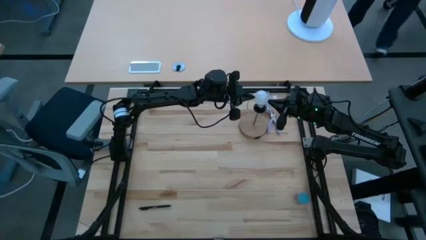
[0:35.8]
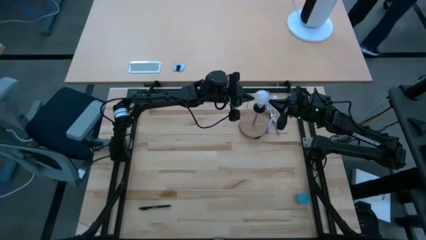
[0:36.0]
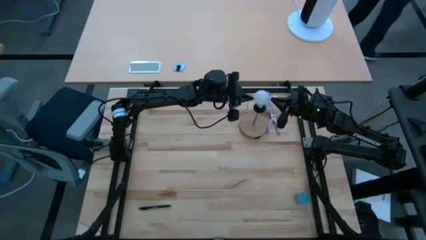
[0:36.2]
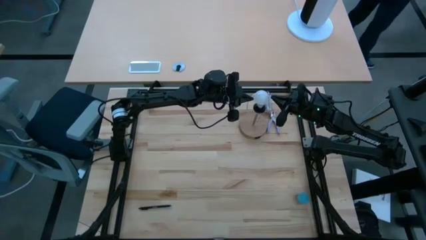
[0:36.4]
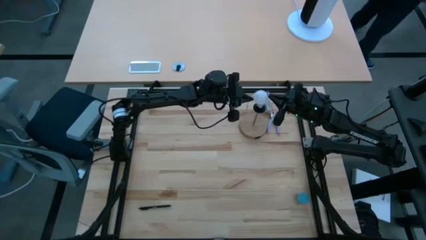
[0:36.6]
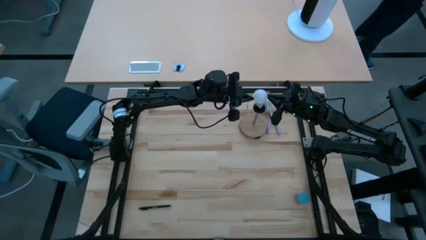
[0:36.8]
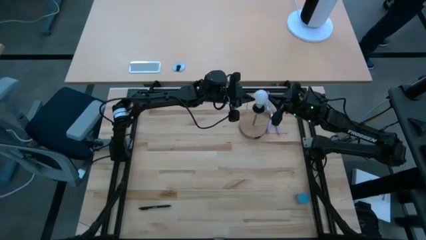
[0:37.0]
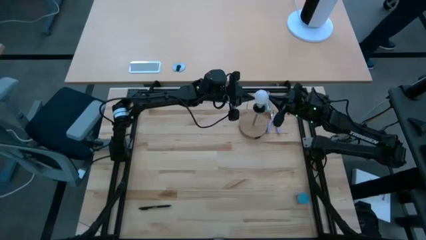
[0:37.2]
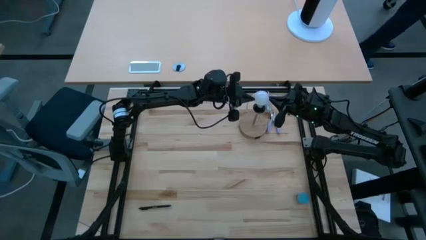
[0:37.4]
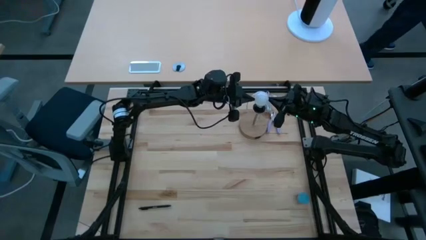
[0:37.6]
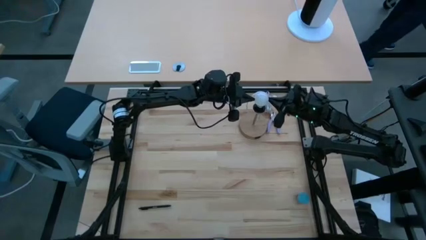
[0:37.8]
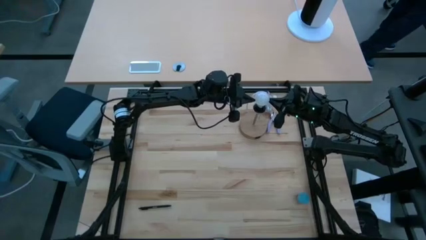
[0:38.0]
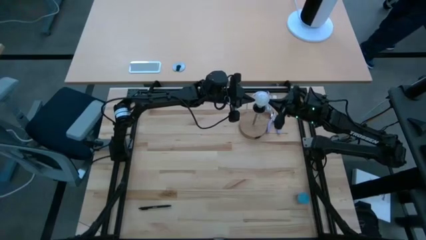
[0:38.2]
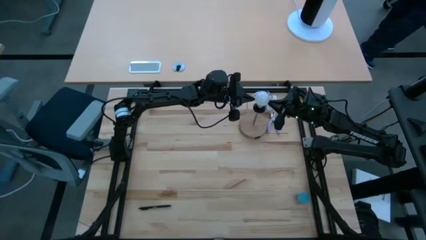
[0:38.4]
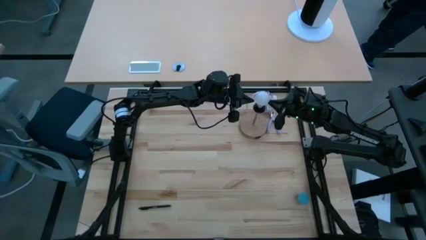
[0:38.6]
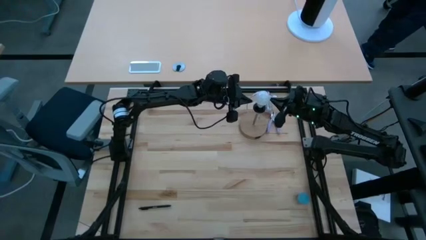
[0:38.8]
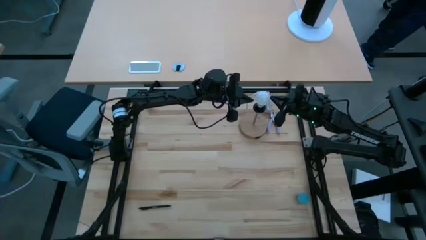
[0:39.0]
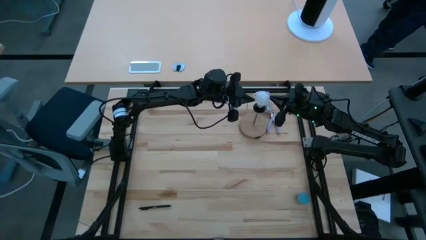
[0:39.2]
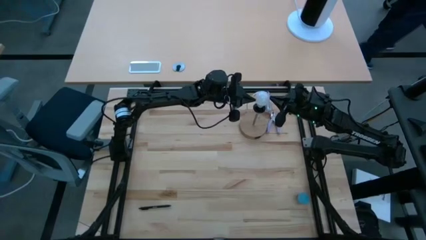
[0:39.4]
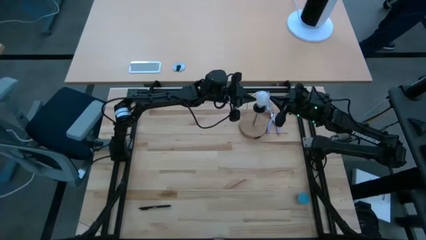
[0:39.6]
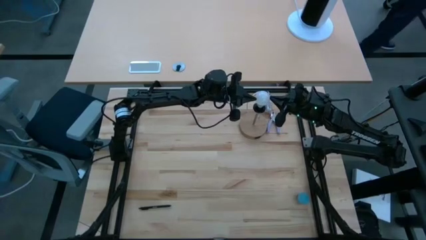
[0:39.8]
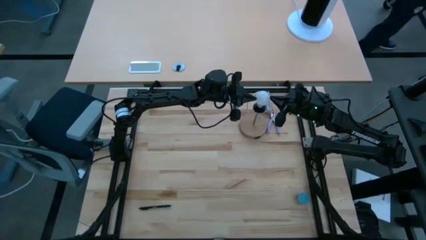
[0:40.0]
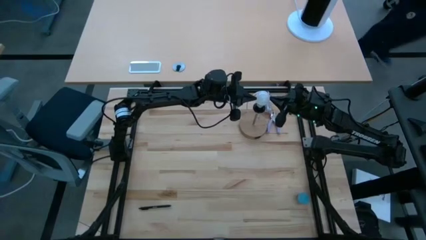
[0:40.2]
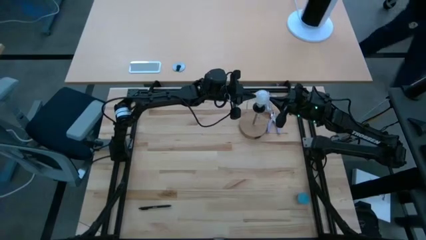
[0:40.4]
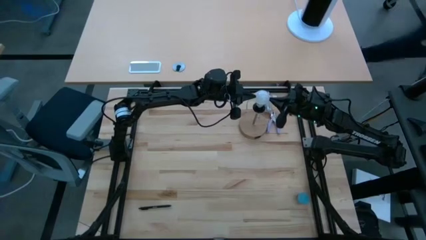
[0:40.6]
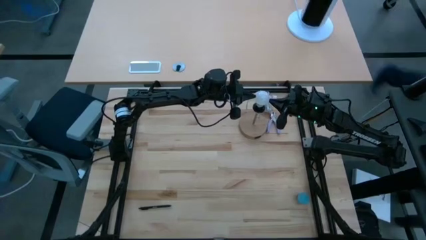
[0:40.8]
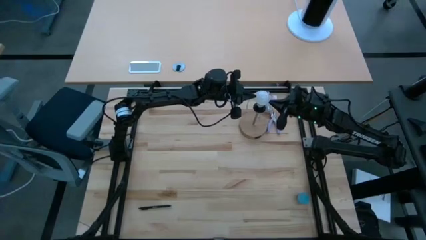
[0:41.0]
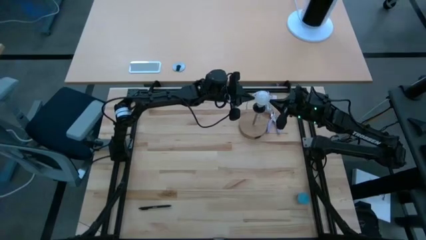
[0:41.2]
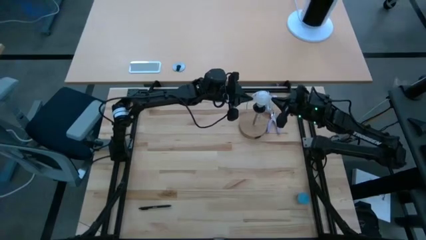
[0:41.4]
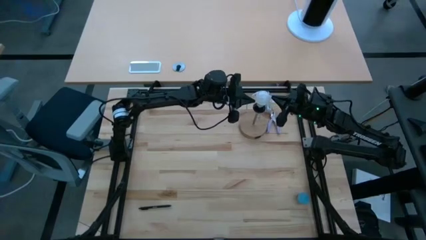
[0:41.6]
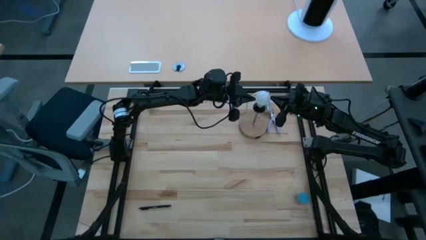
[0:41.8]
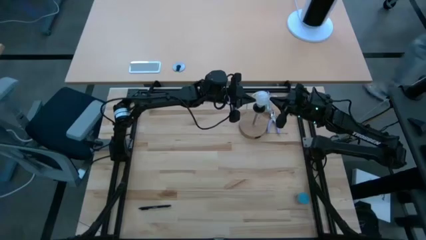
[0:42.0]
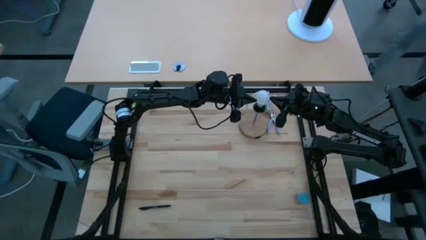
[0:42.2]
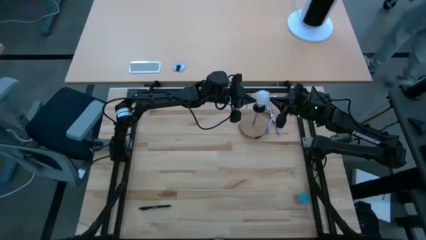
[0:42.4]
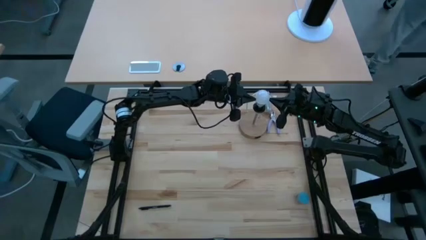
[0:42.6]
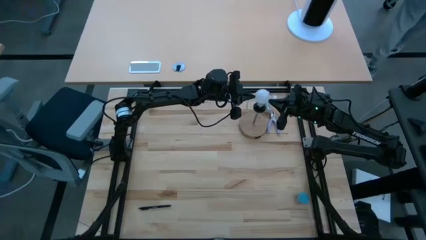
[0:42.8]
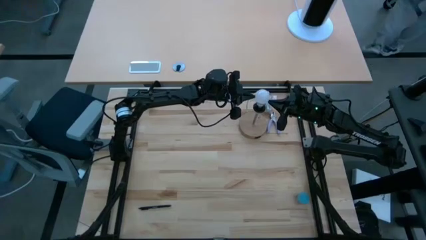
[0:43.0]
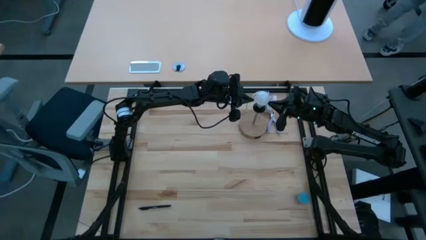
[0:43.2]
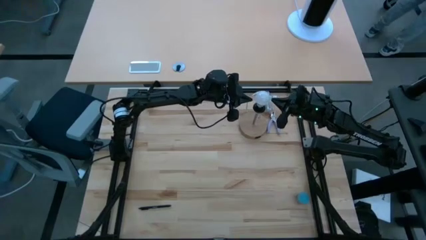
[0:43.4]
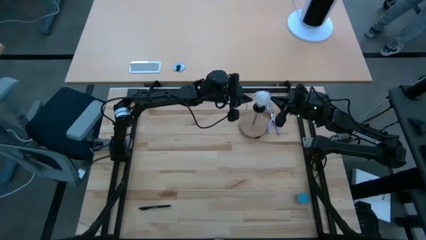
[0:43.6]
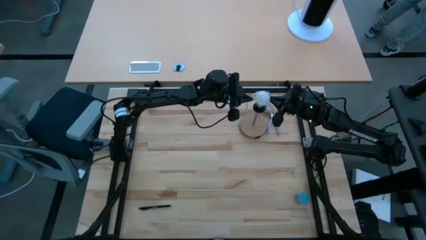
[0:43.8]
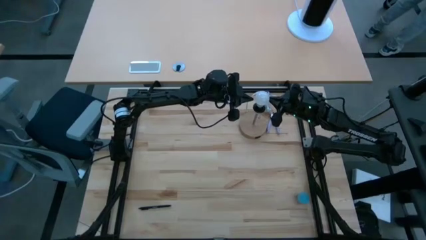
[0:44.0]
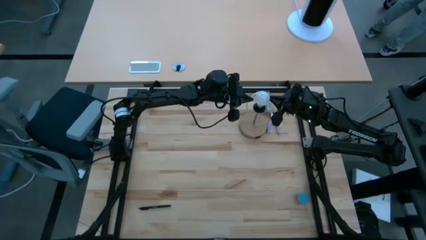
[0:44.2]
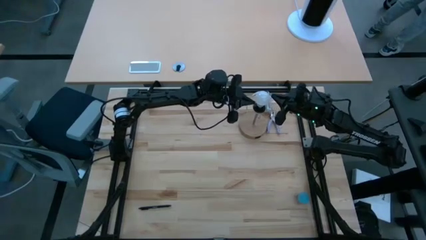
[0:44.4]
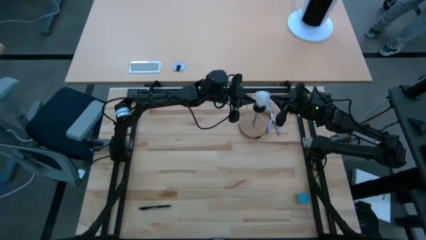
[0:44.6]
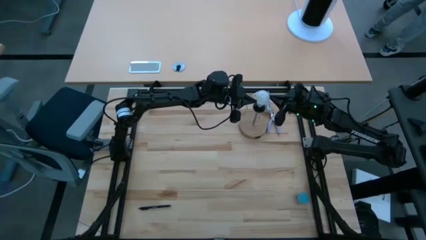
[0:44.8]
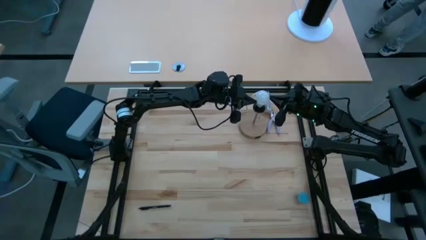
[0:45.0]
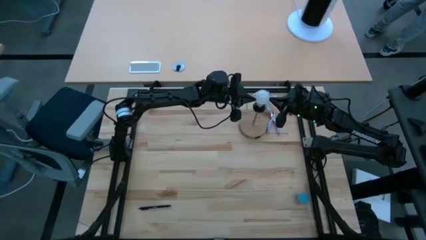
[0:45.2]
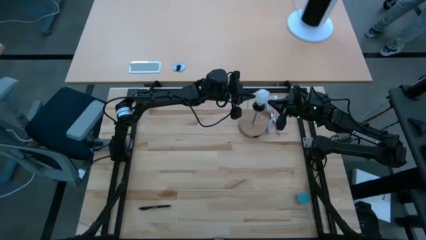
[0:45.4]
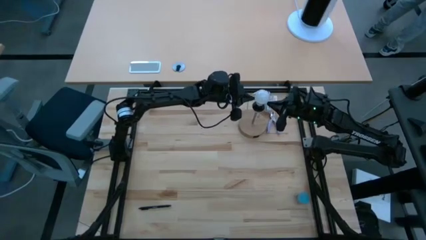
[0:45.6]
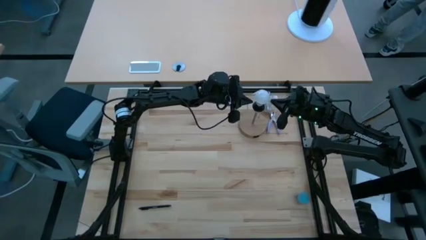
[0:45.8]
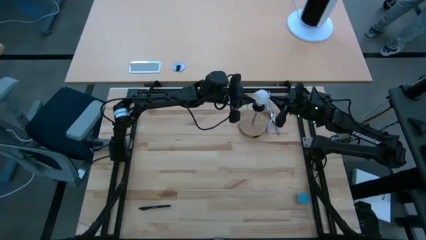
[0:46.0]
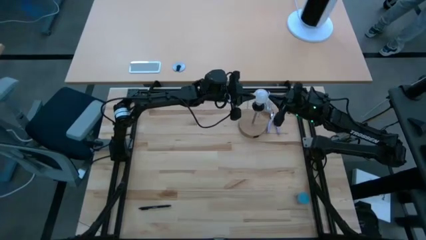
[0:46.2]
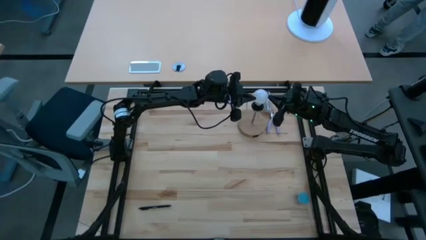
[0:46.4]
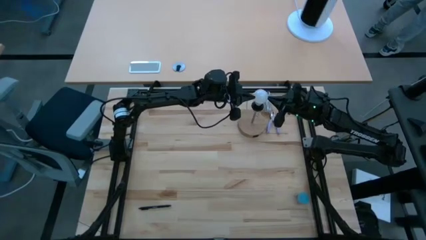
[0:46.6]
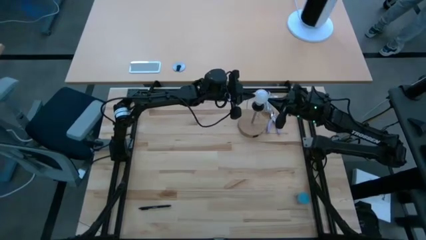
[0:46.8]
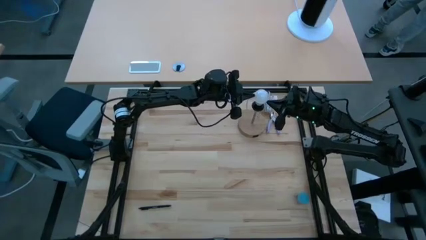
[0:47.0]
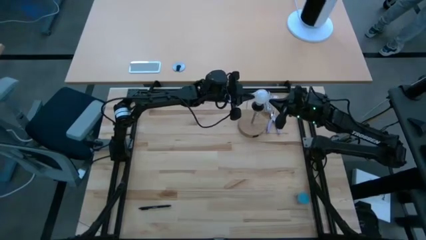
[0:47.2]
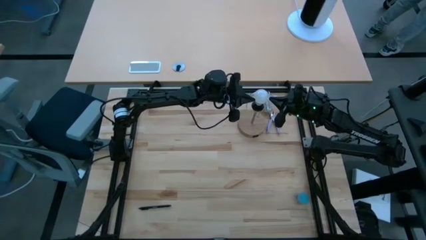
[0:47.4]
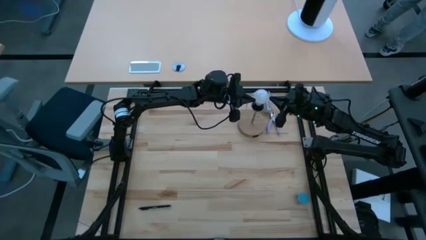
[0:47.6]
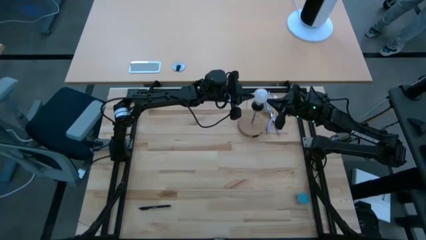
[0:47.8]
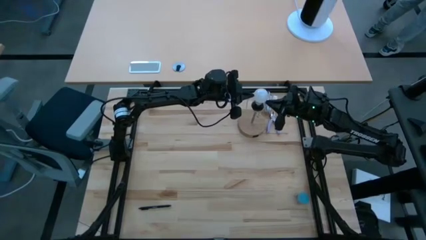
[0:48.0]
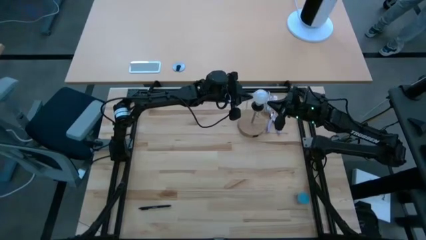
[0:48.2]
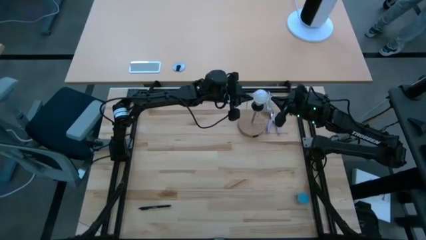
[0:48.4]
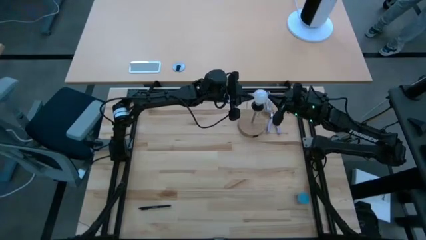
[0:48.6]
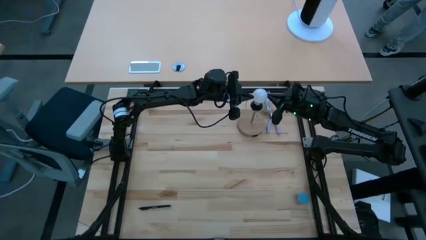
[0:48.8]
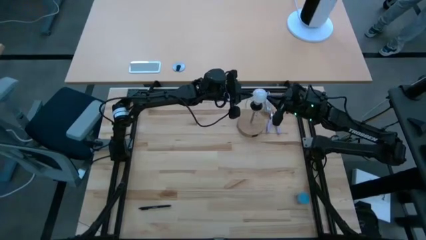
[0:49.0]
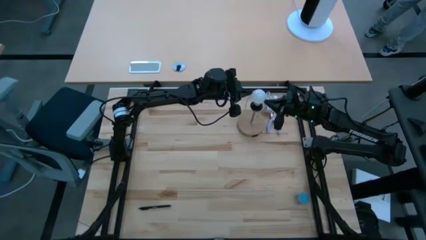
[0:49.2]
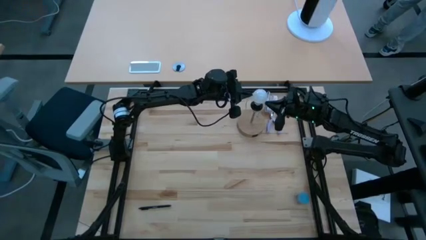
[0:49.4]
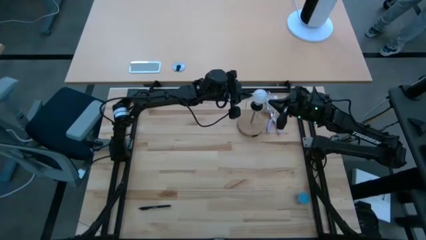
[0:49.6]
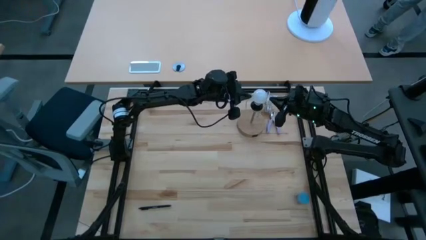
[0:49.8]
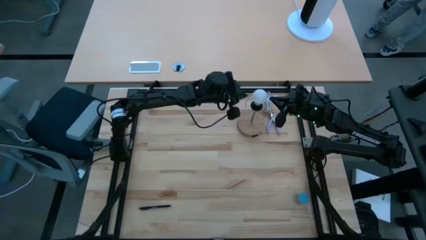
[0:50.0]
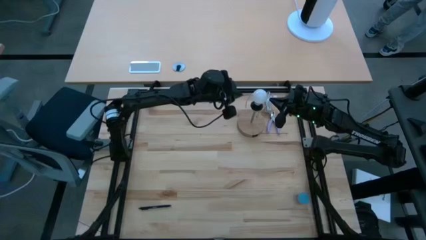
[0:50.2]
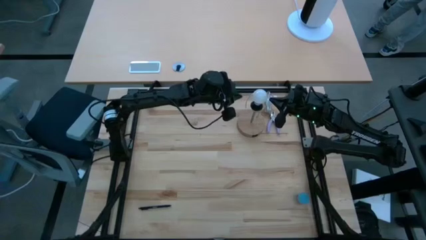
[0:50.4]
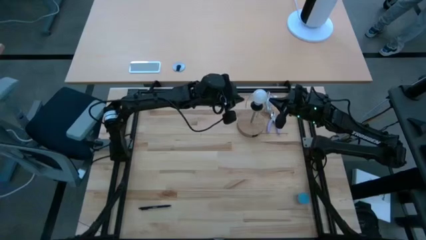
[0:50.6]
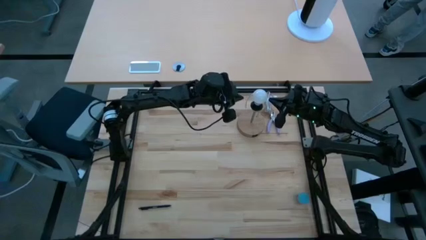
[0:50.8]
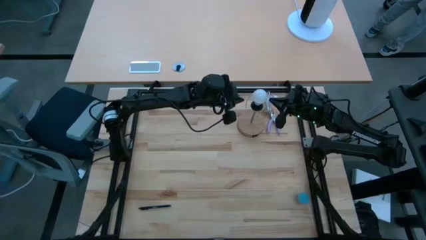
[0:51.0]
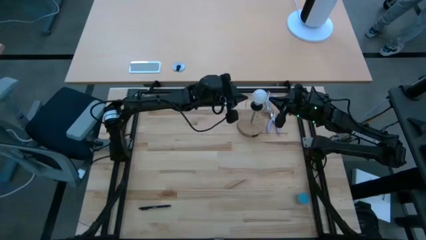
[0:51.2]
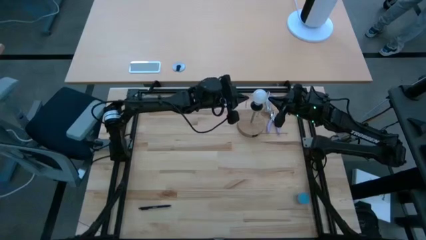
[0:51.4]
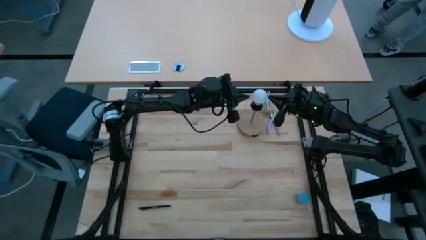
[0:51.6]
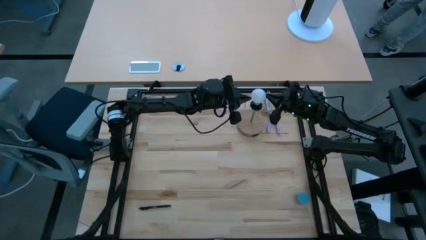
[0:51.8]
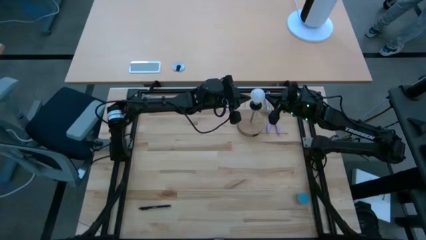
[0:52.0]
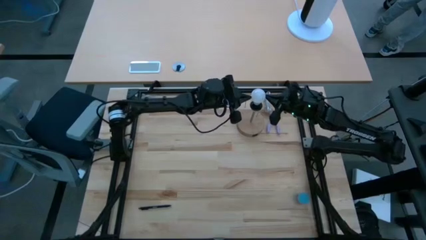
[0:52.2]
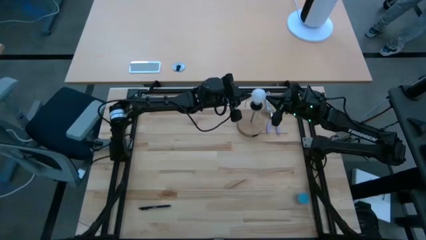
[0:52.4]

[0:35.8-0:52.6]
Task: Screw lightbulb
Insert the lightbulb on the lamp
